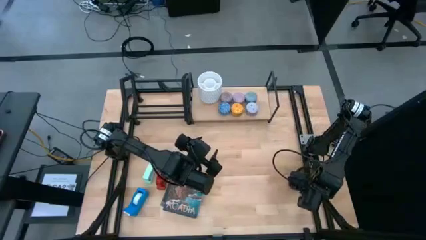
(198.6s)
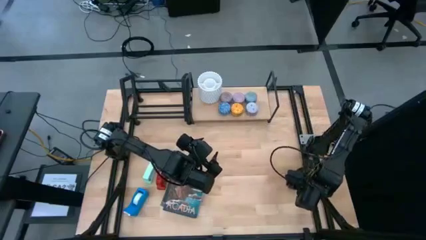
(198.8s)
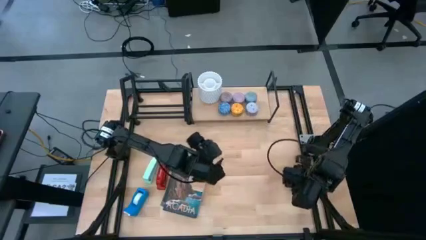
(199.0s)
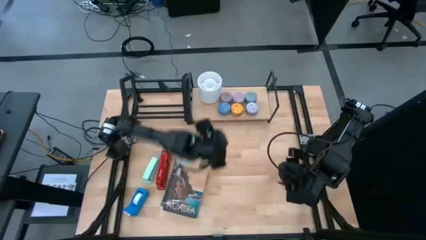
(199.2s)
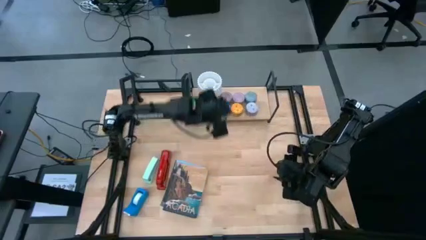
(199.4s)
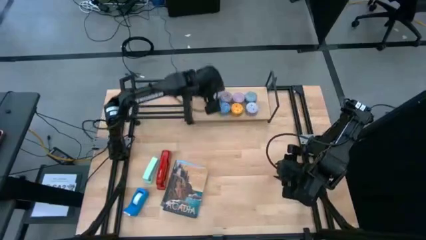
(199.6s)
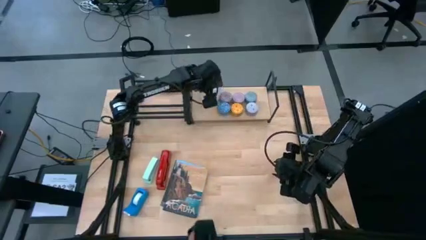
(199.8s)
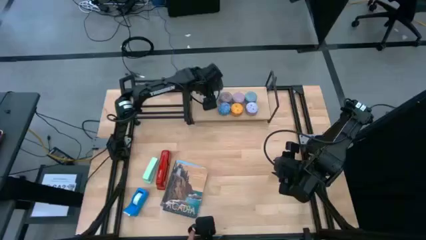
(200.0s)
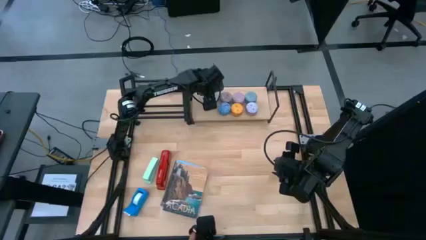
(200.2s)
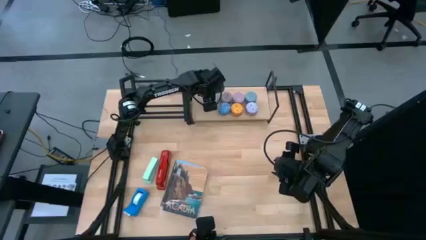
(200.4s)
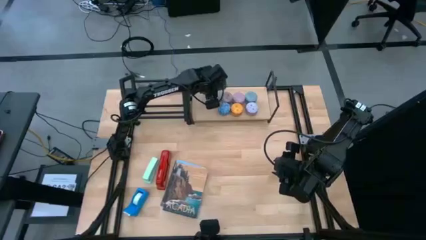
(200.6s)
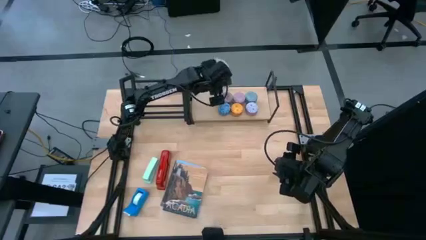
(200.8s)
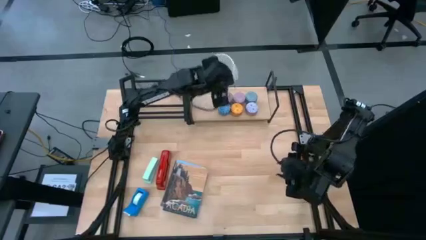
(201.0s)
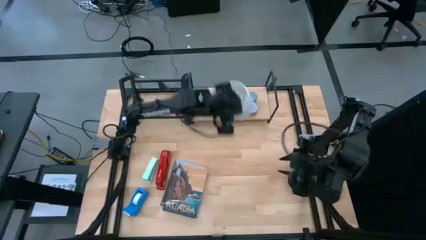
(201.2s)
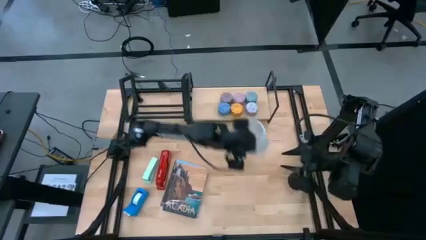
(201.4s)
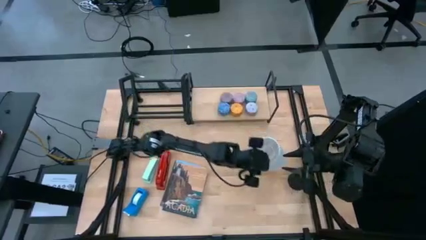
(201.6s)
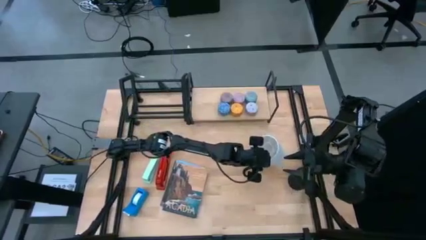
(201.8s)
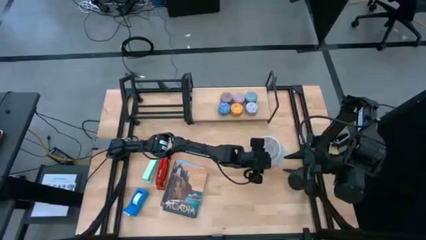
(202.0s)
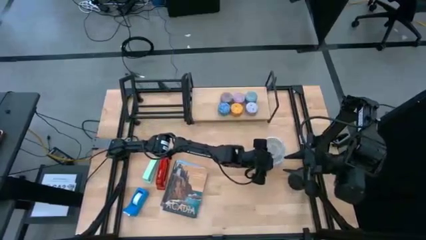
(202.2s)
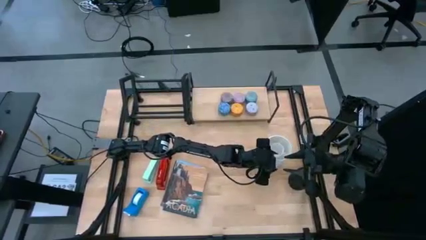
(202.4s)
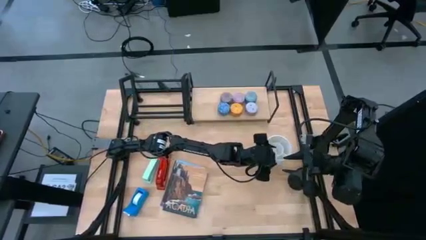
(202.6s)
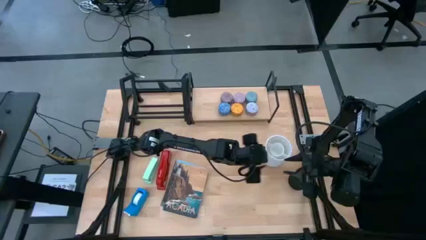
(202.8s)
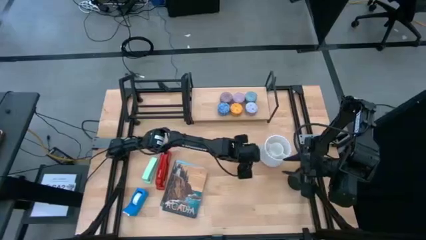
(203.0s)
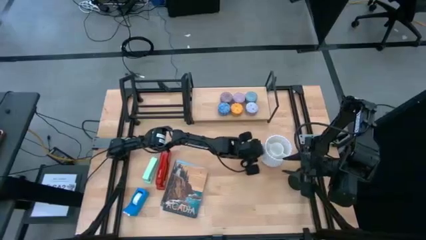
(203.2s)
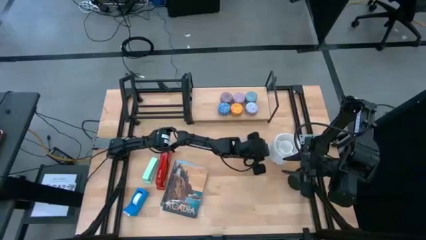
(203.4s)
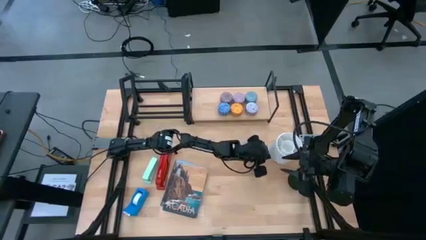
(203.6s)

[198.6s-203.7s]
Task: Stock shelves
Remove the white pen organizer from the shelf

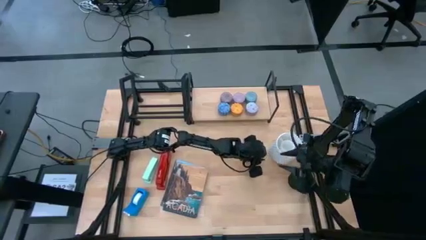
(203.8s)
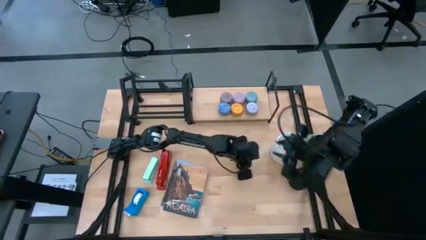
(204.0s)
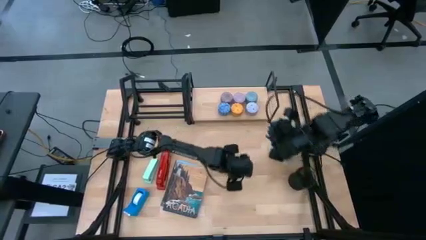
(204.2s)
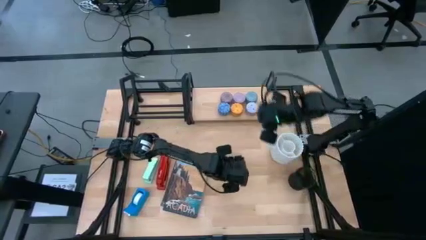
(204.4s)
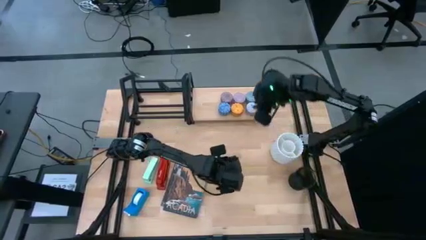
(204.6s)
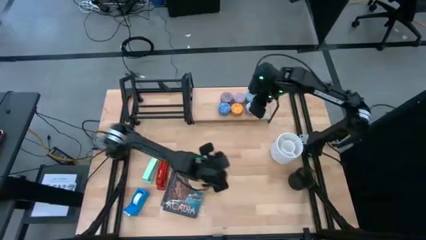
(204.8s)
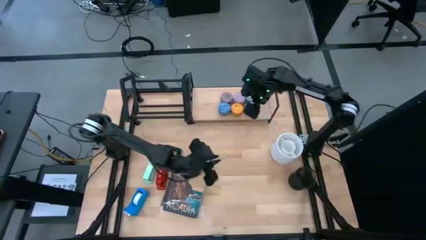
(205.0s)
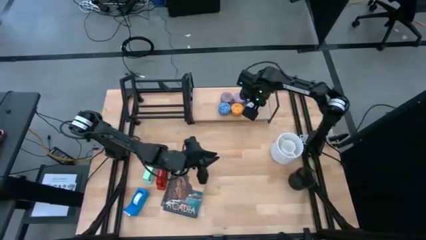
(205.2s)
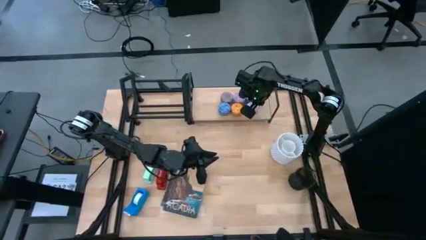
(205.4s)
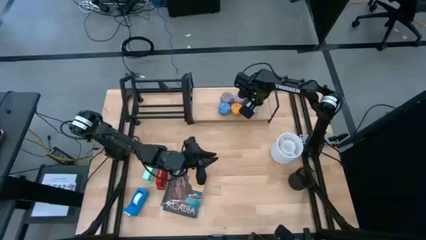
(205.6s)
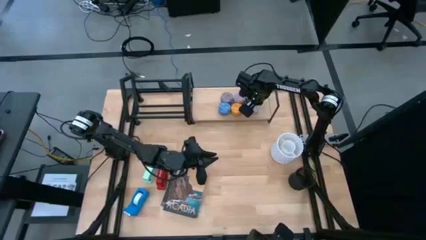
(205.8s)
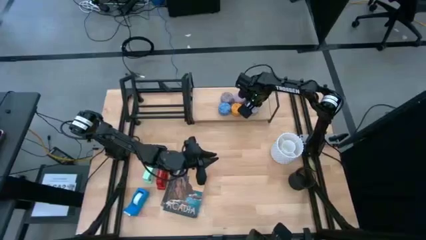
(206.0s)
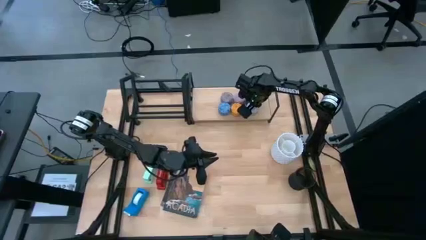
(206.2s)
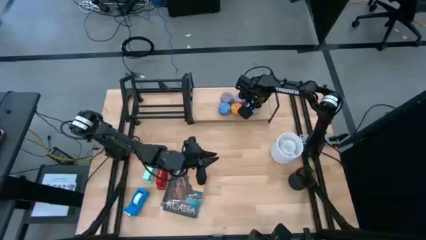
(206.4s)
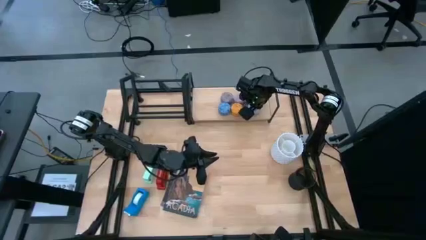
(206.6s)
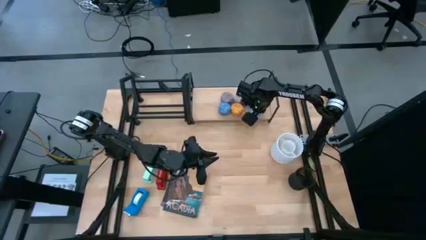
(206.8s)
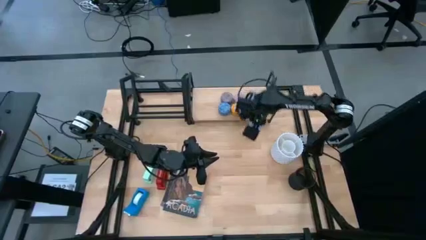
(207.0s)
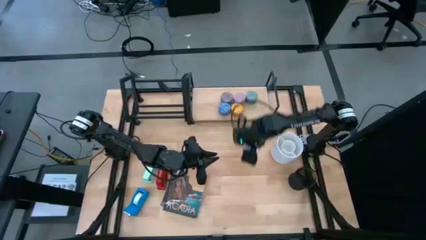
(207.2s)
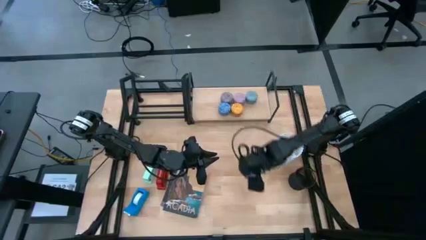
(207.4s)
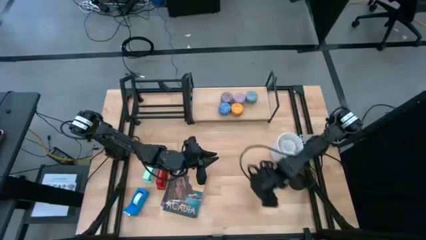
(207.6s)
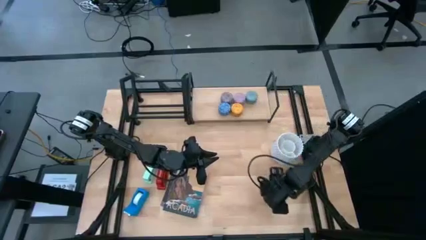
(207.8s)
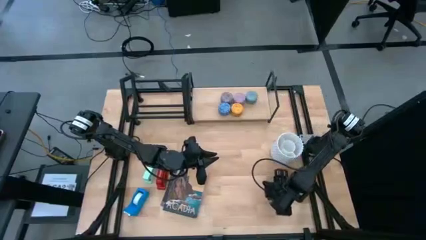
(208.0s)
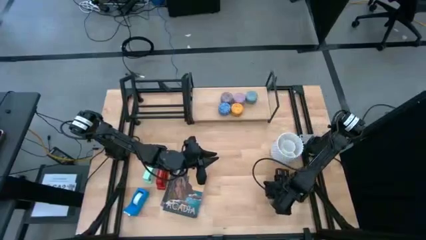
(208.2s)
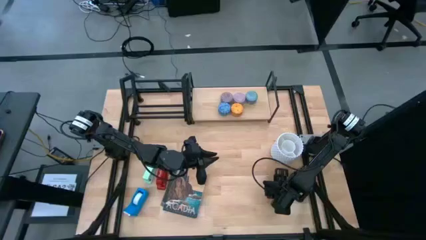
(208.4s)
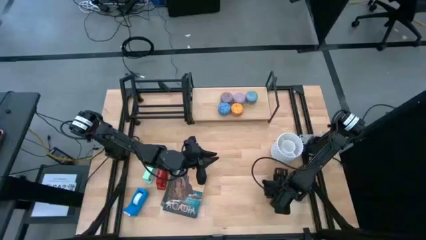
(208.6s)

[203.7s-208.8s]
Remove the white scented candle from the shelf

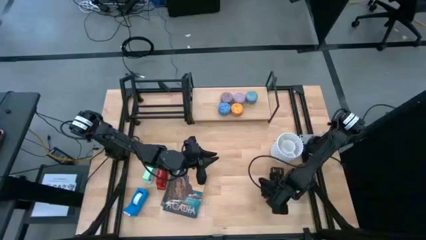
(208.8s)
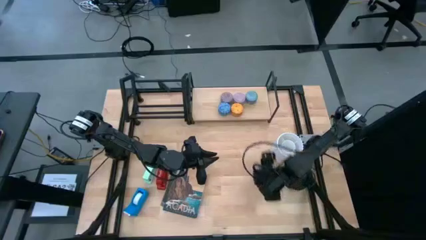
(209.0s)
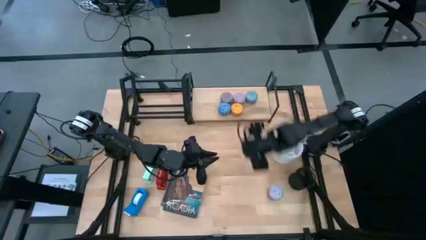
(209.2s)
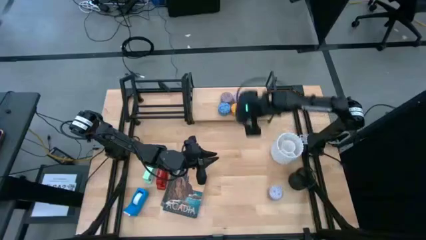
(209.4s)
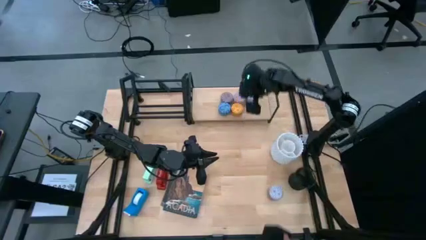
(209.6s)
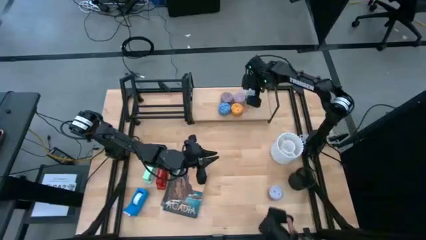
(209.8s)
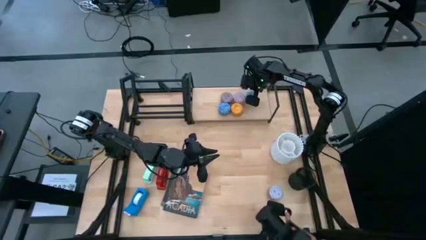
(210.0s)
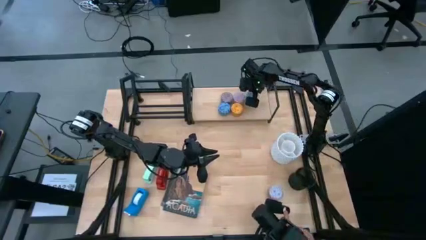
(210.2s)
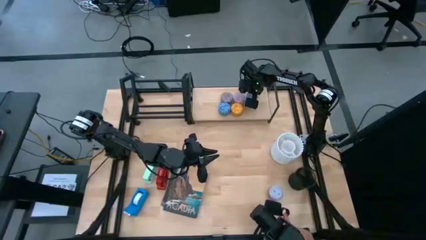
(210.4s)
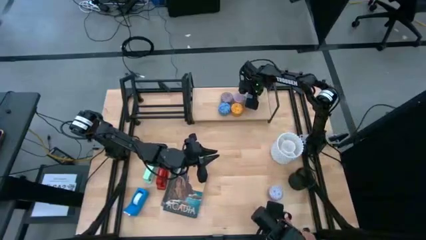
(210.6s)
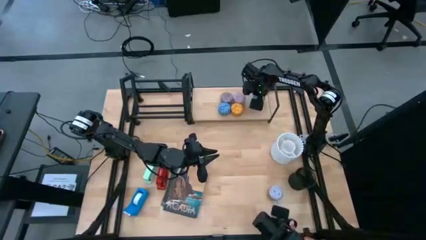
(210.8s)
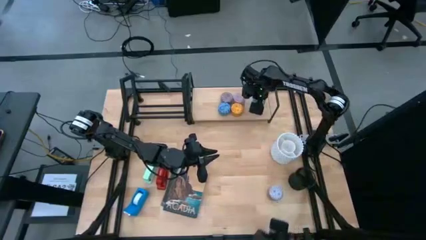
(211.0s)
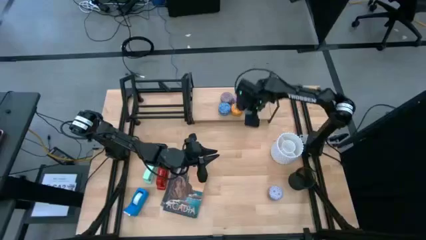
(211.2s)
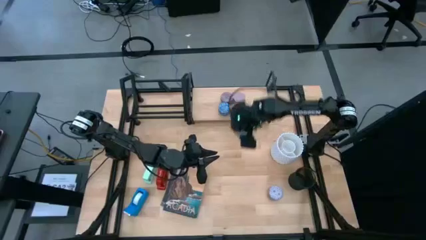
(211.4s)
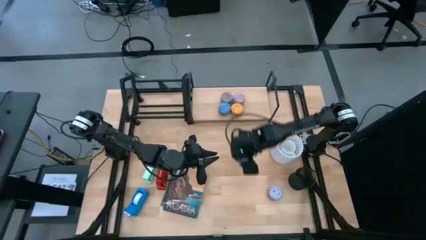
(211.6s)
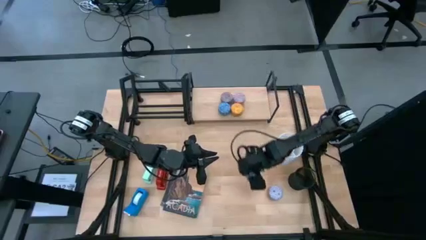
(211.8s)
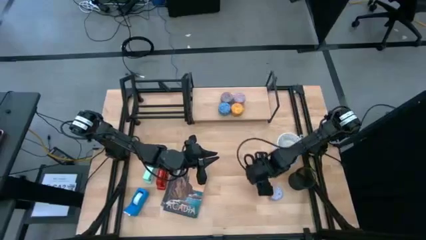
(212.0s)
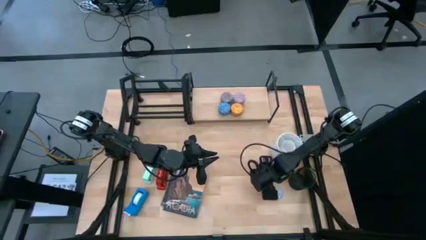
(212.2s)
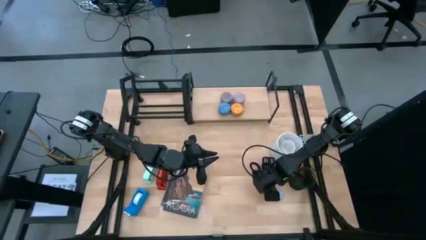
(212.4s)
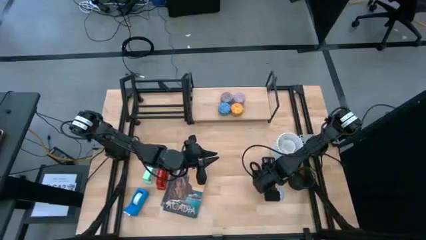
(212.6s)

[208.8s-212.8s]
Remove the green scented candle from the shelf

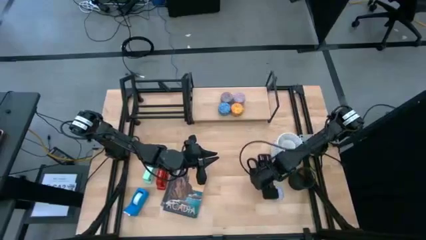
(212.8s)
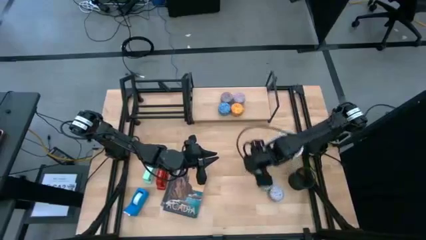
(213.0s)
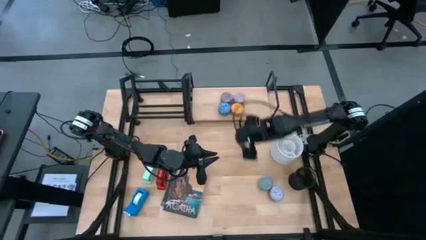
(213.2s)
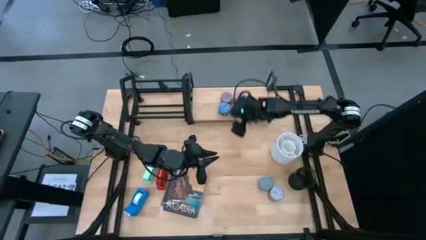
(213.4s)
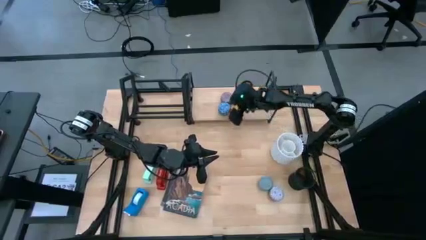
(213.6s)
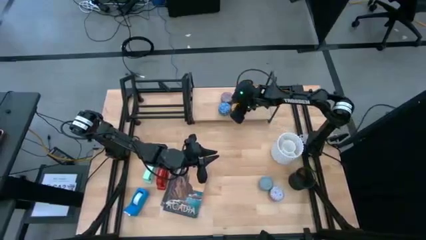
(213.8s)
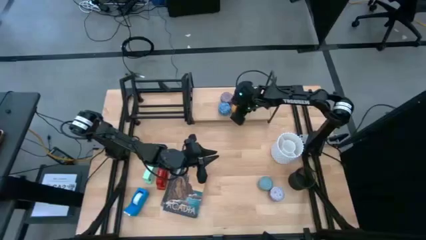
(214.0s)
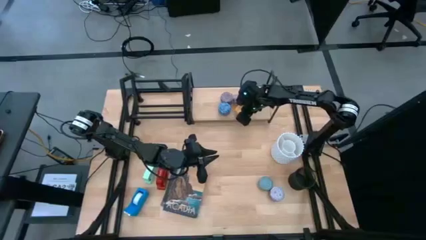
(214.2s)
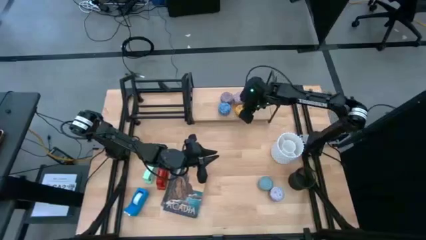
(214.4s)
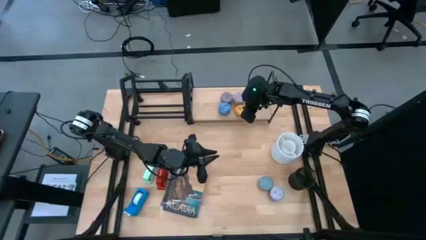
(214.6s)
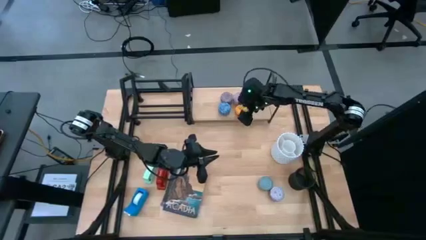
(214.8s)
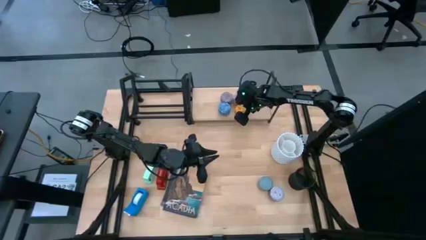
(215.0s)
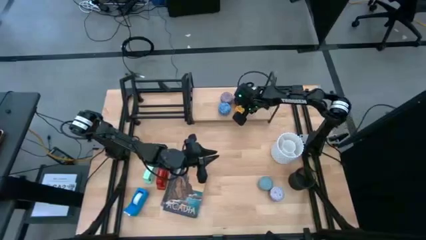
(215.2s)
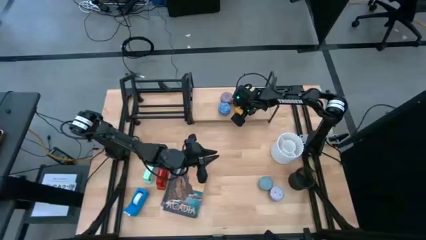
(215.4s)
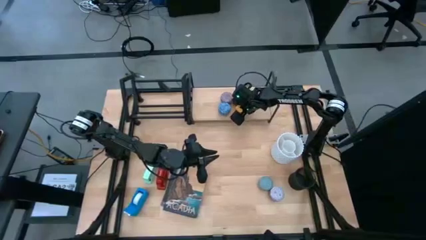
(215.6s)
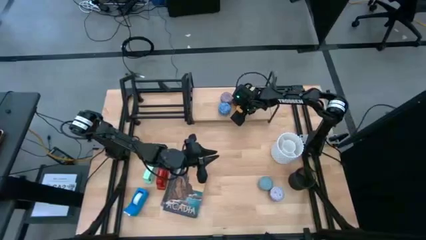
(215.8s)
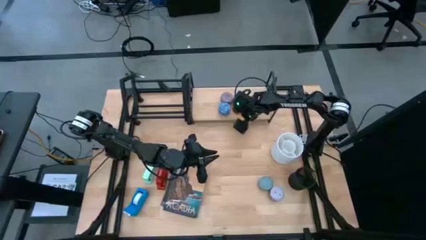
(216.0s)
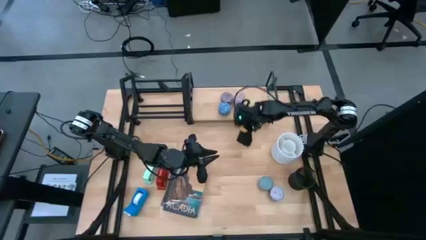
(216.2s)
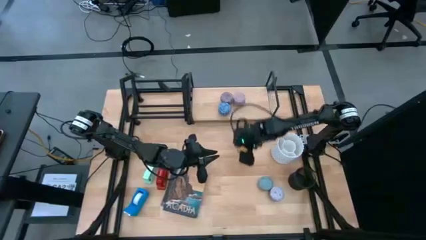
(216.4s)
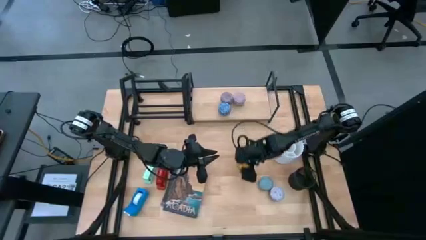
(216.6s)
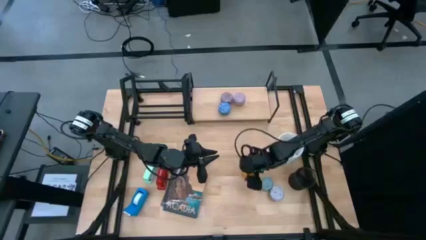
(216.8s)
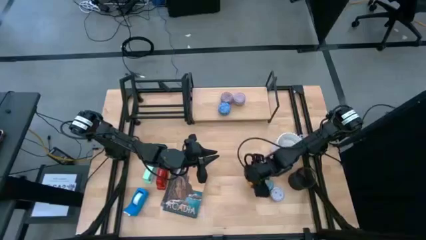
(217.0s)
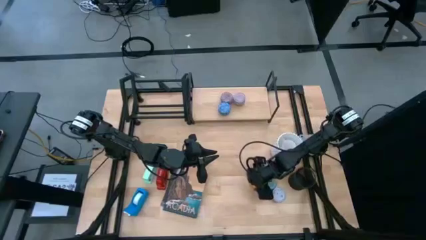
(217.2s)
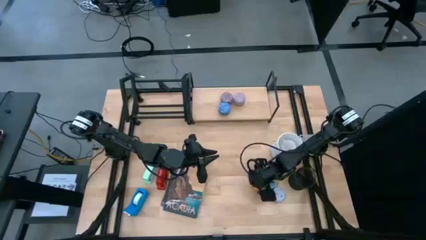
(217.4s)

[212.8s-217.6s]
Remove the yellow scented candle from the shelf
